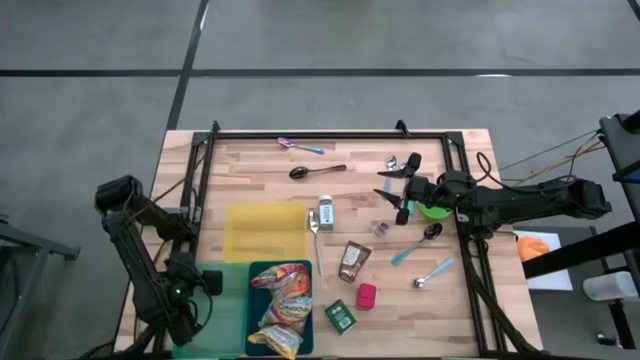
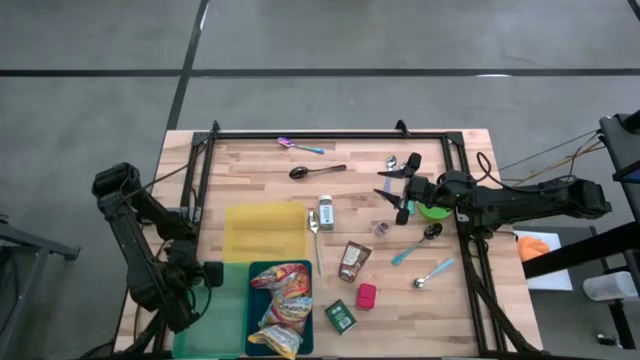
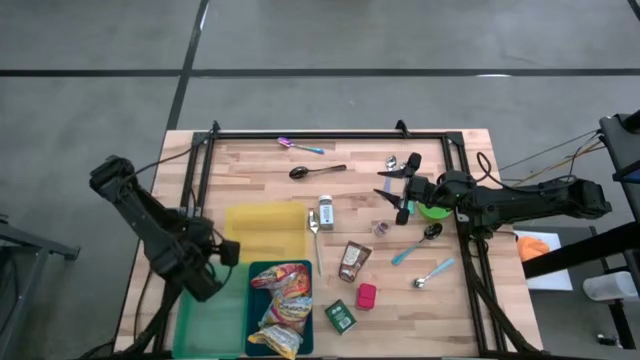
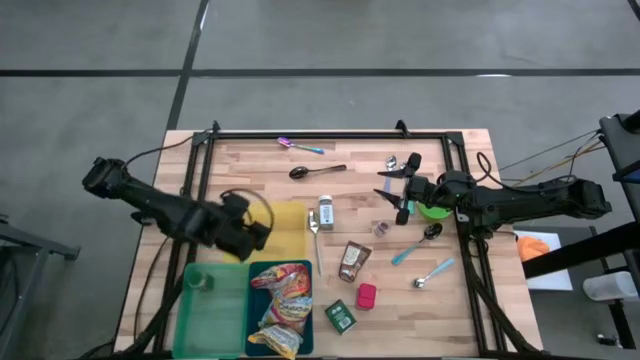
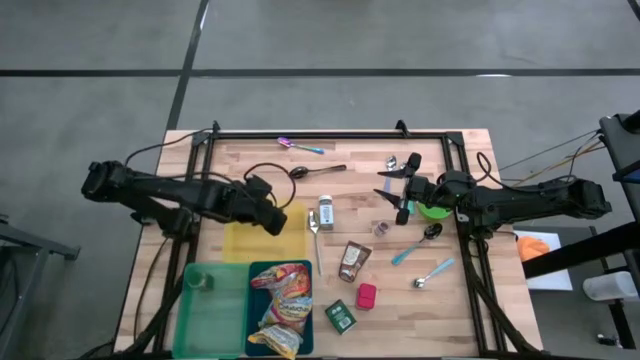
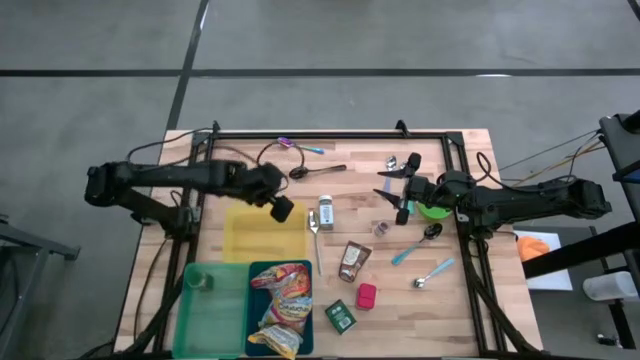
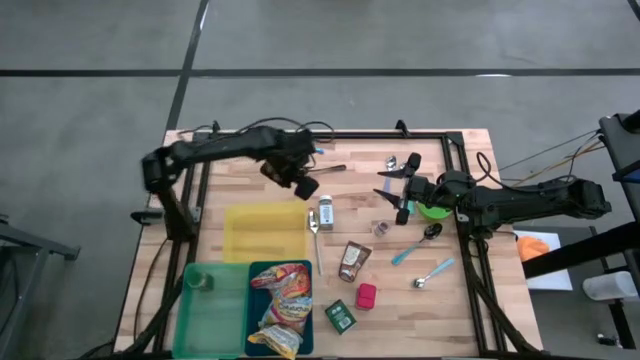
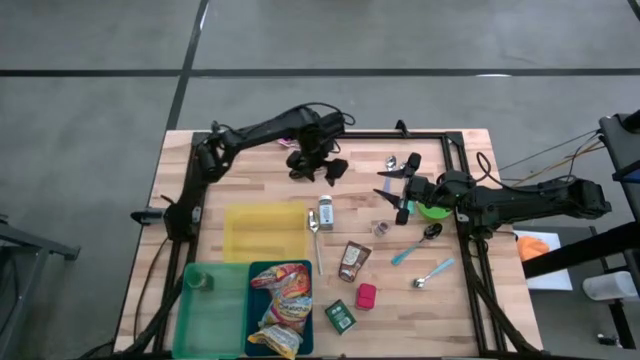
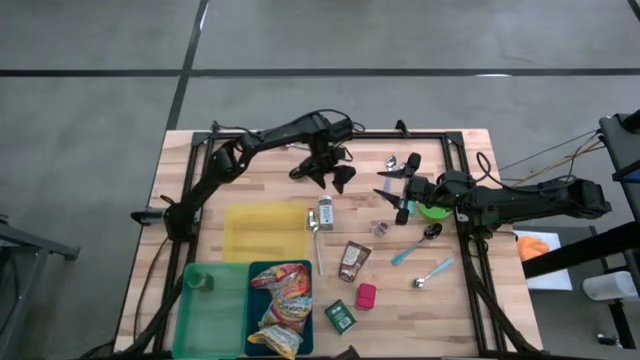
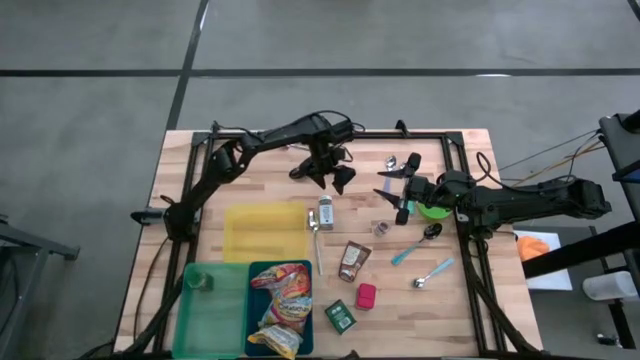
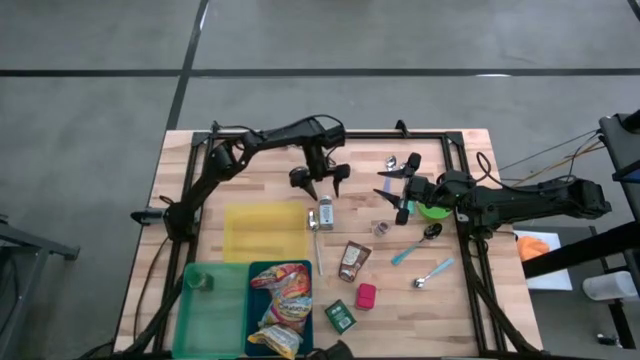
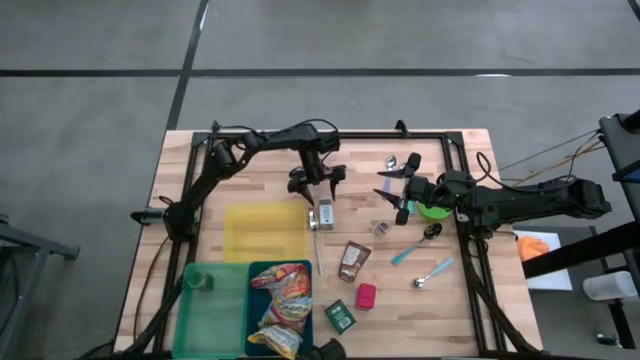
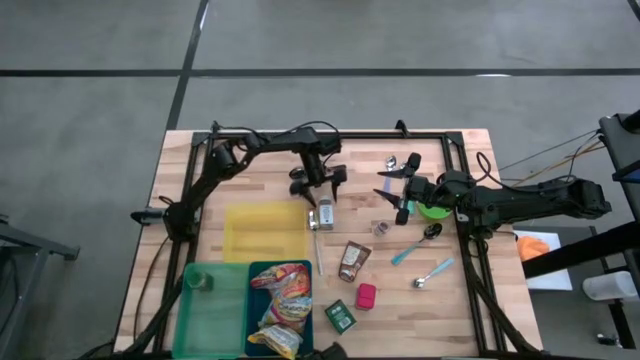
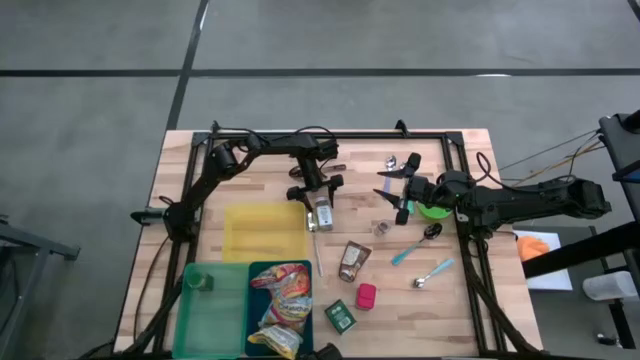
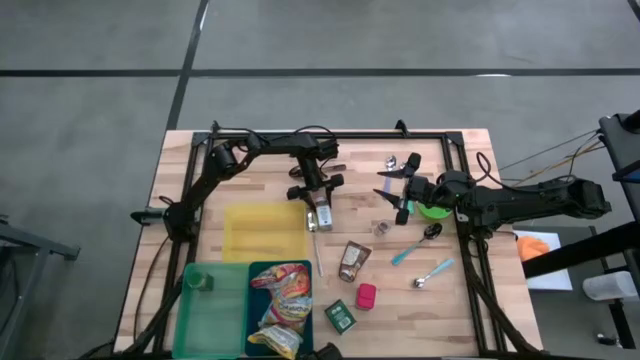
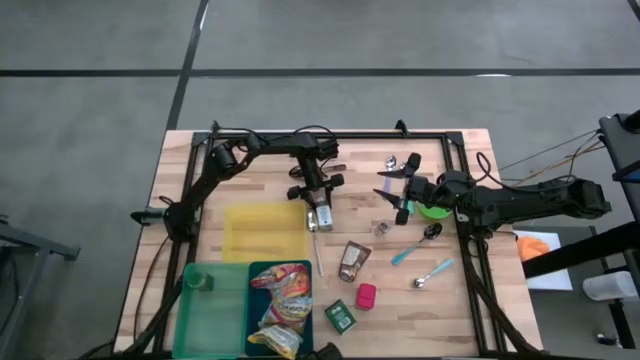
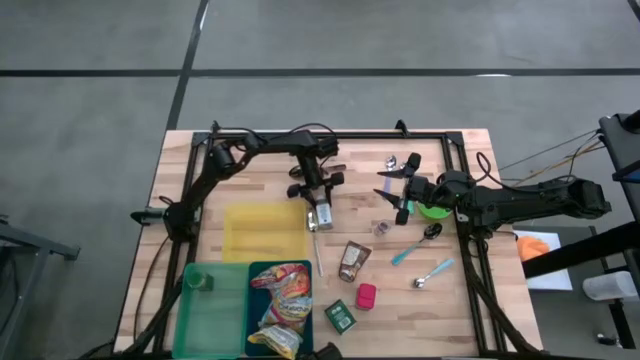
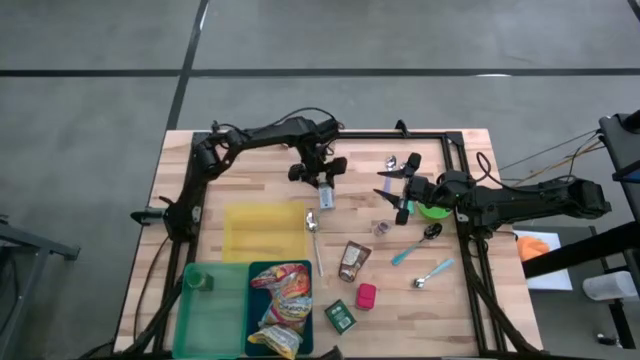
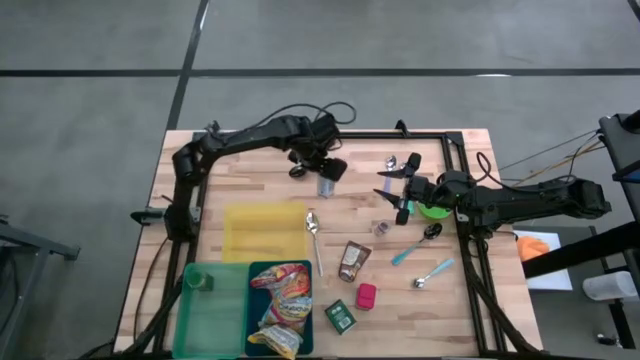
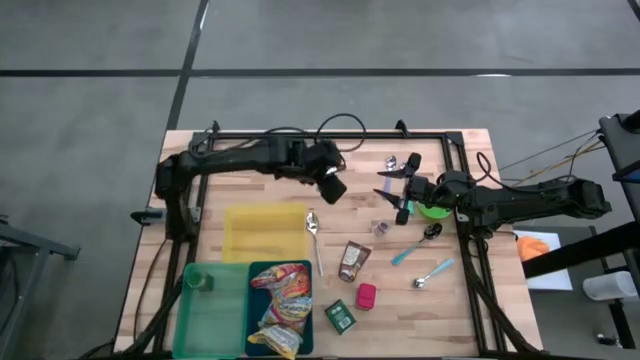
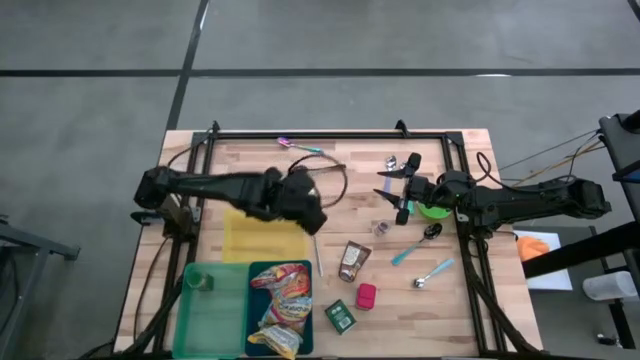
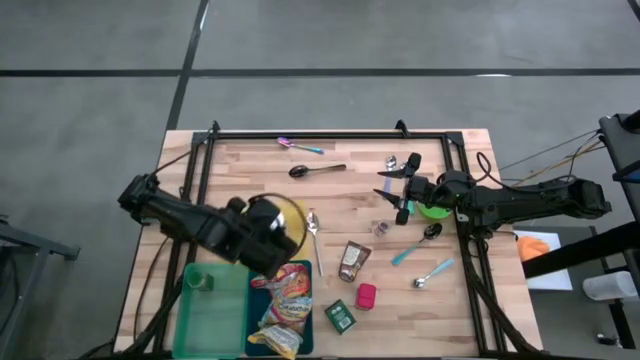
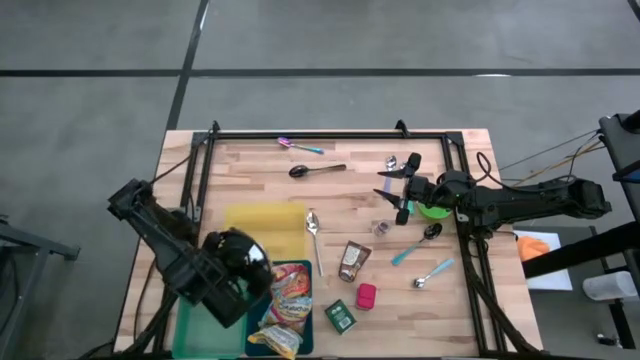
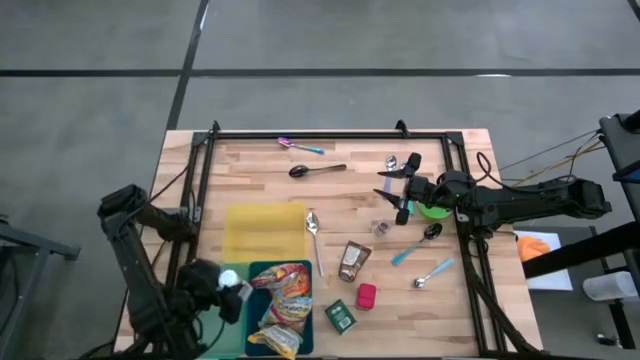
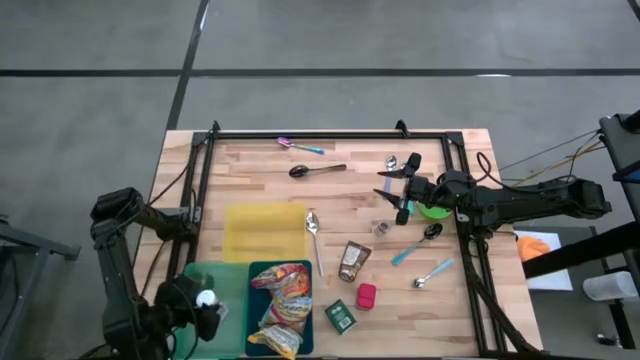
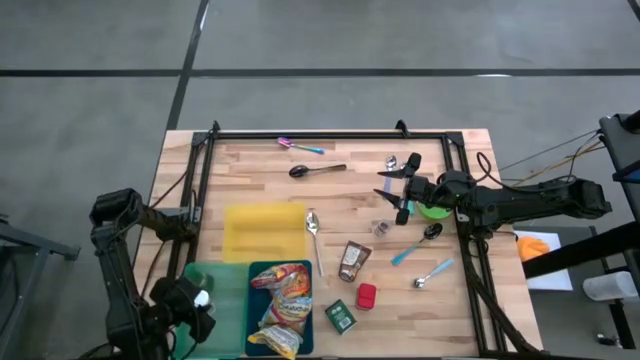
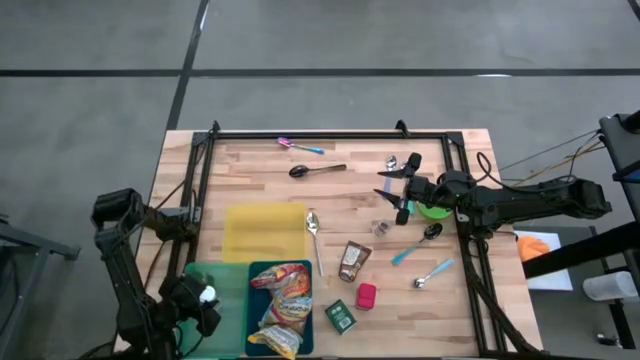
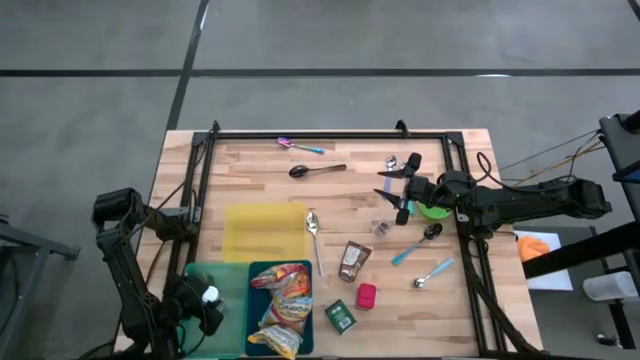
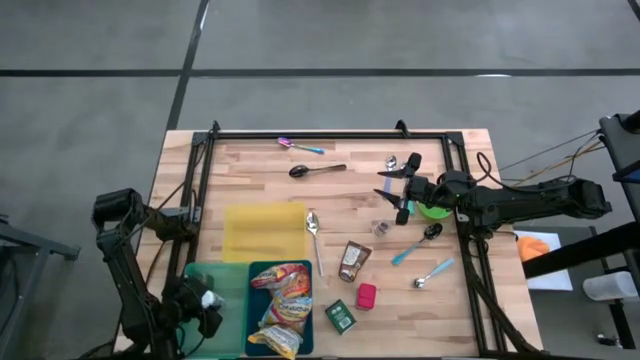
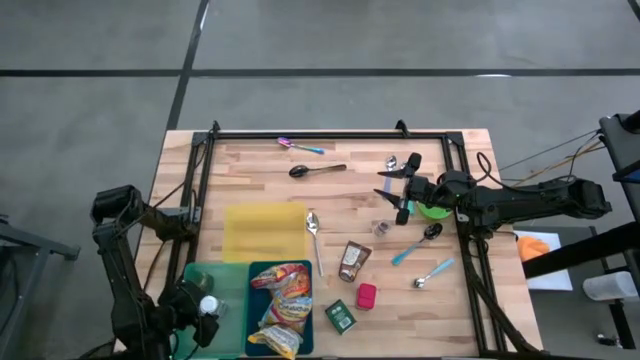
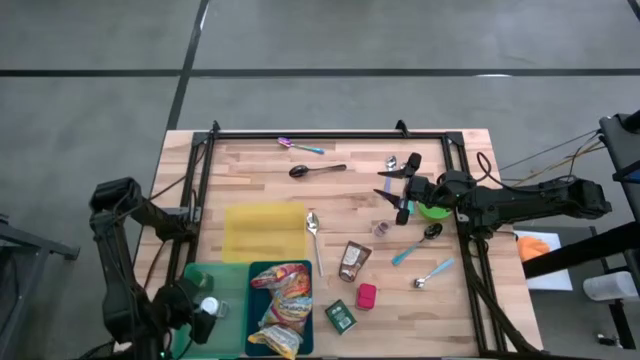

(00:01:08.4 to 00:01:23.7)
Put the white spice bottle into the green bin

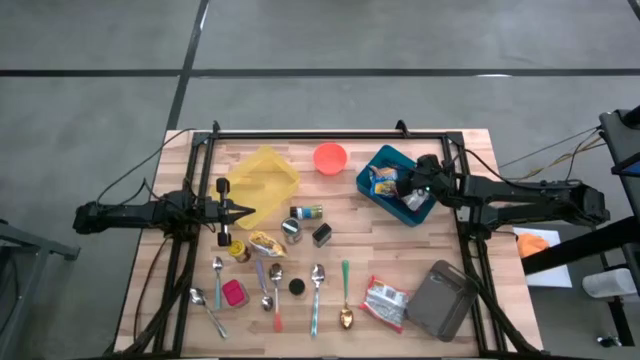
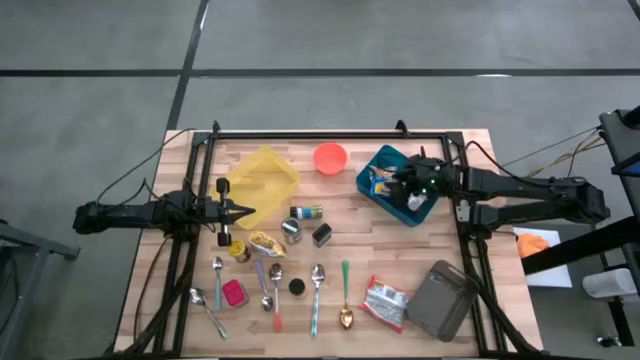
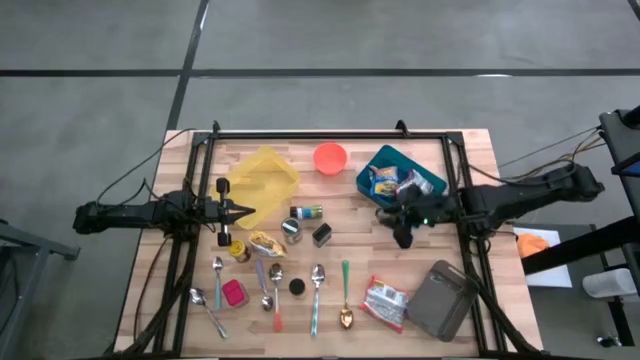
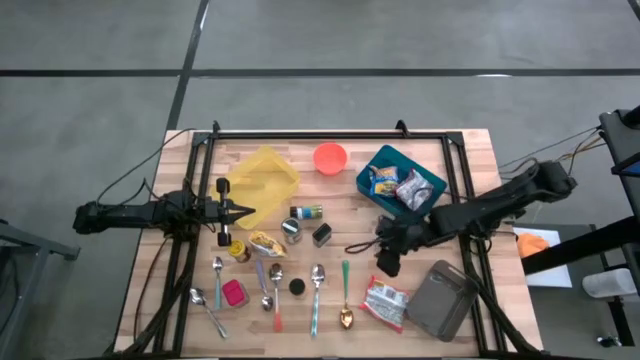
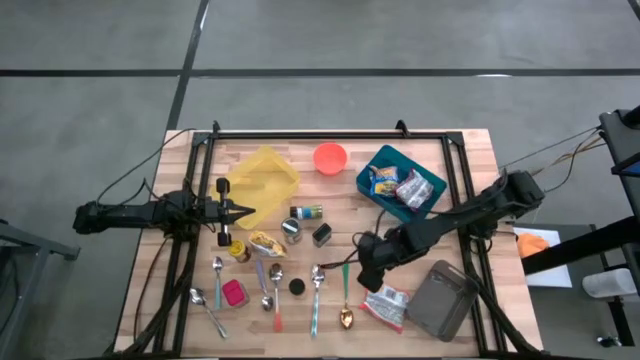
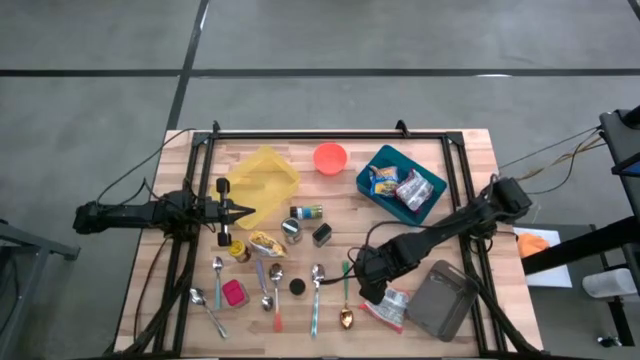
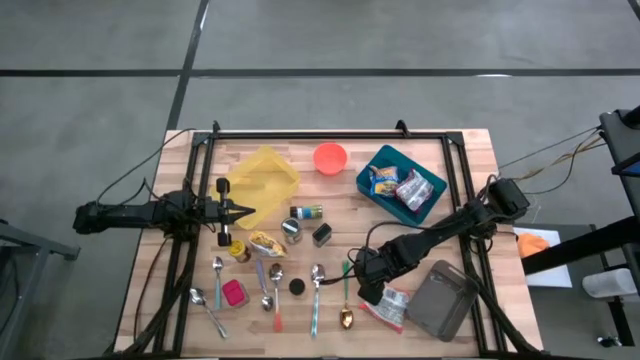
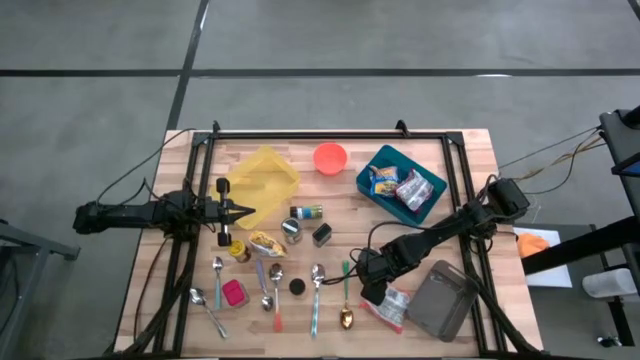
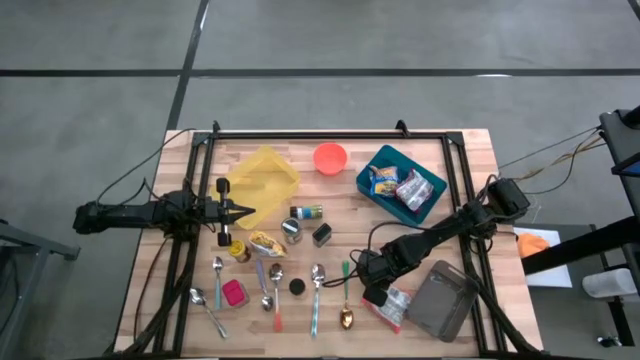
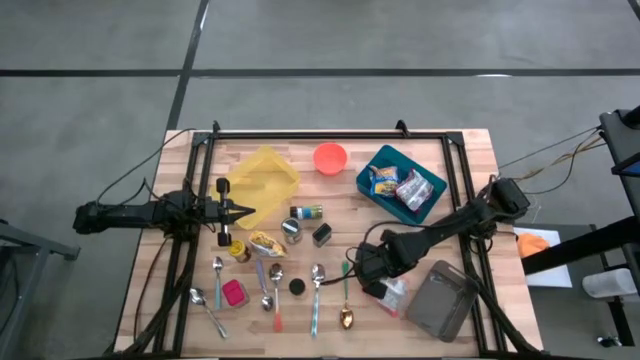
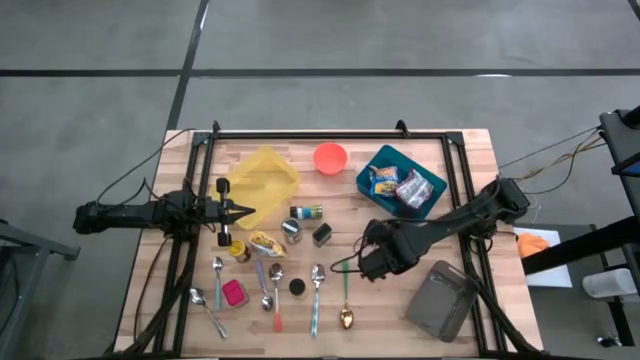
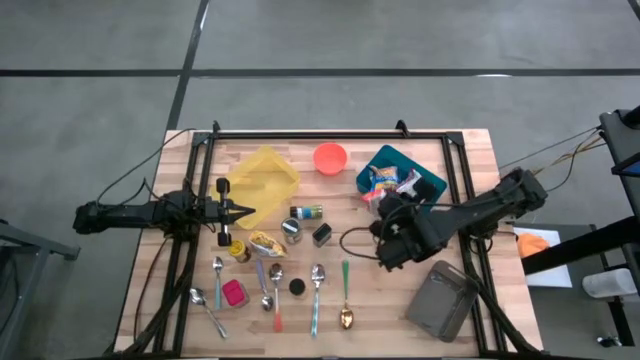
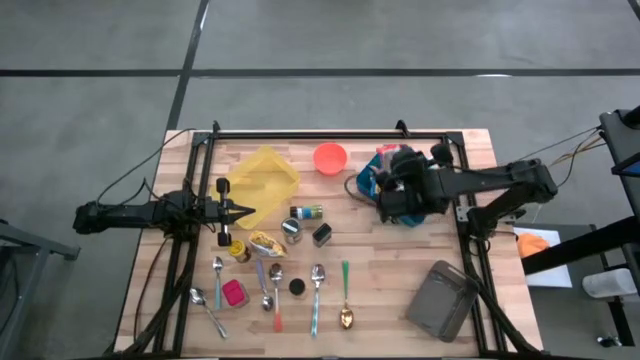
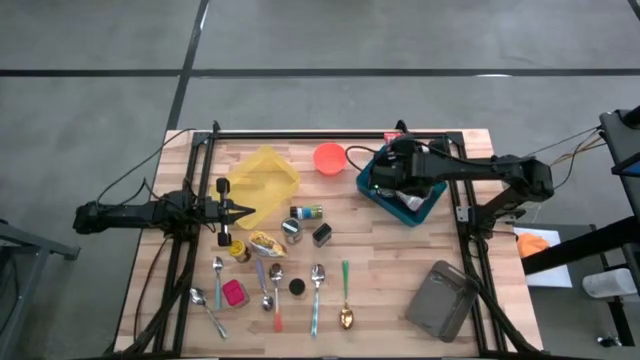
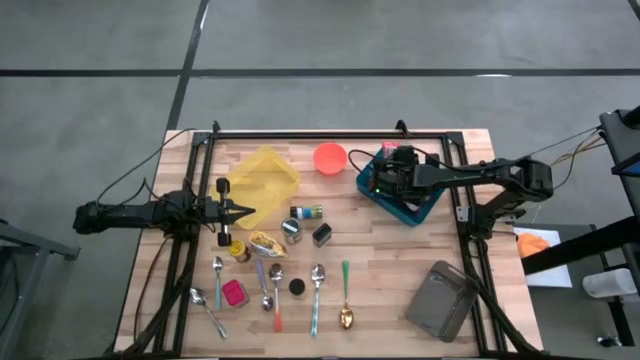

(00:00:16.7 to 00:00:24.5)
Put the orange noodle pack into the blue bin
